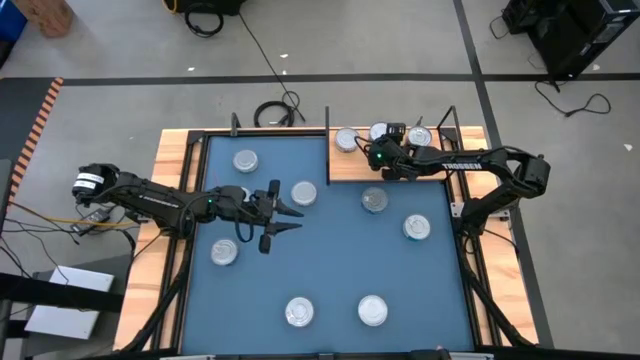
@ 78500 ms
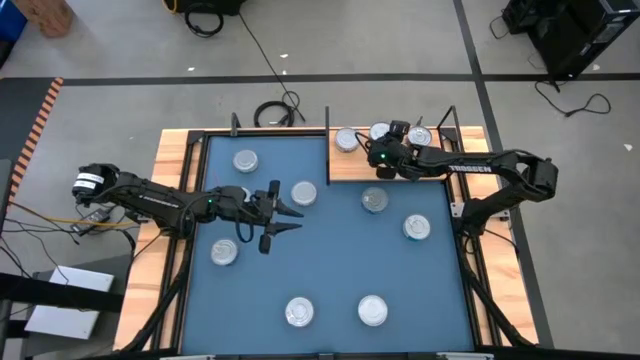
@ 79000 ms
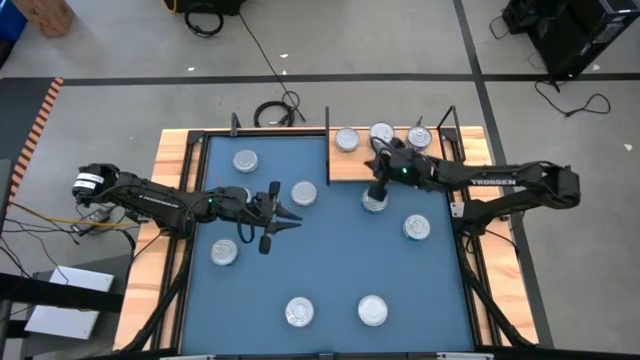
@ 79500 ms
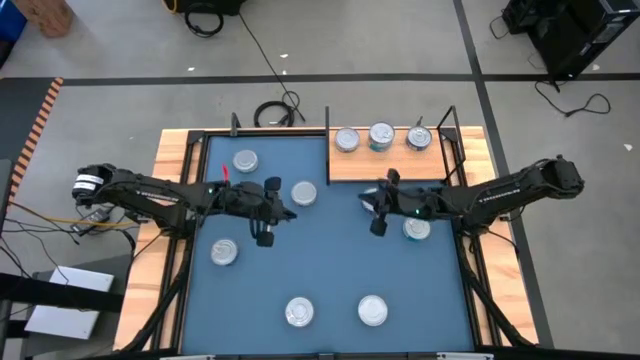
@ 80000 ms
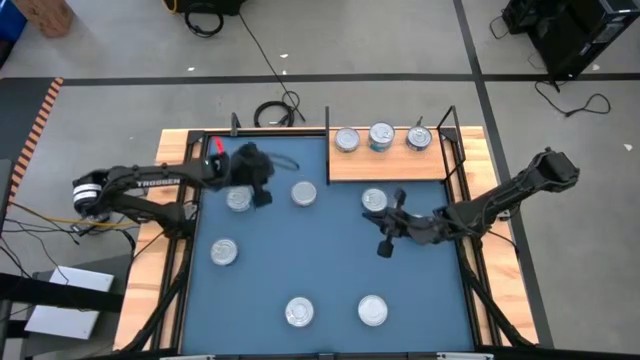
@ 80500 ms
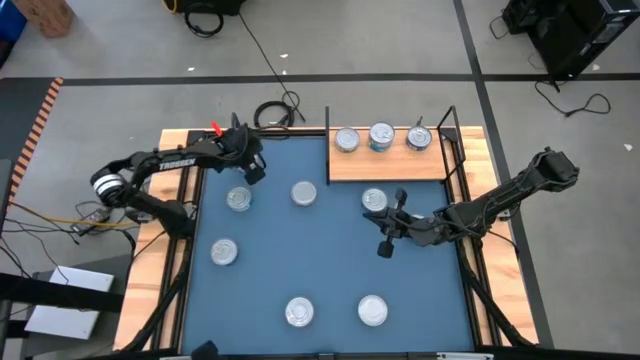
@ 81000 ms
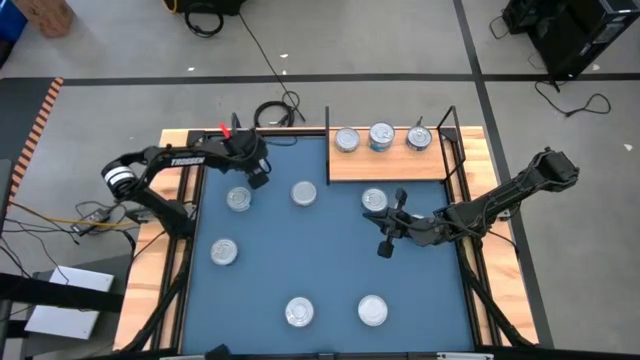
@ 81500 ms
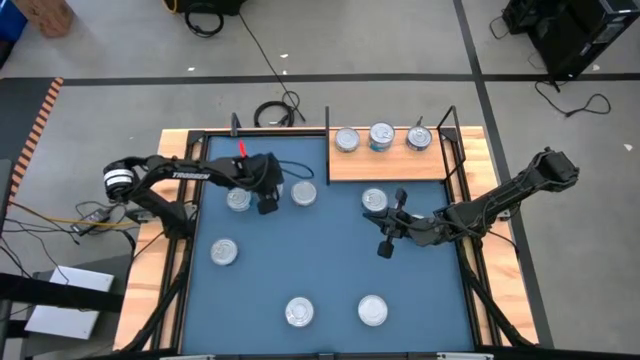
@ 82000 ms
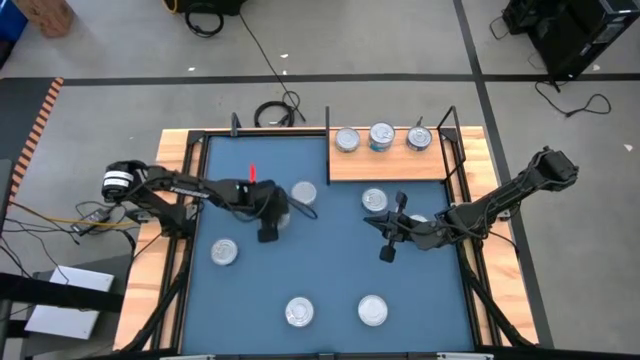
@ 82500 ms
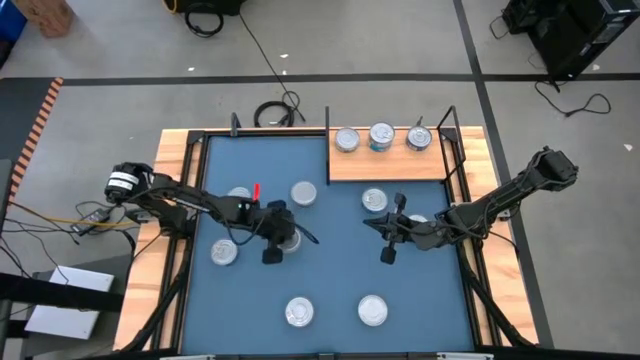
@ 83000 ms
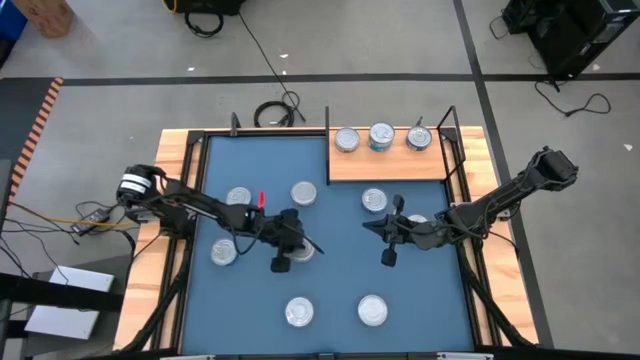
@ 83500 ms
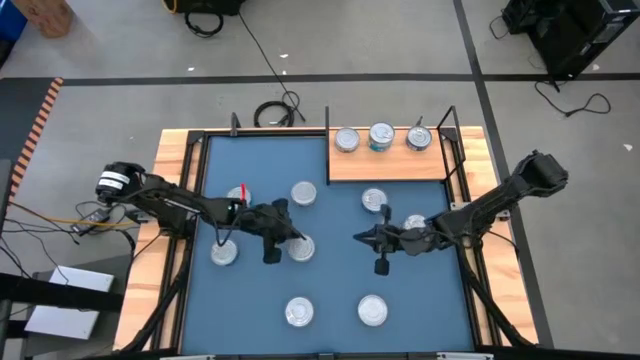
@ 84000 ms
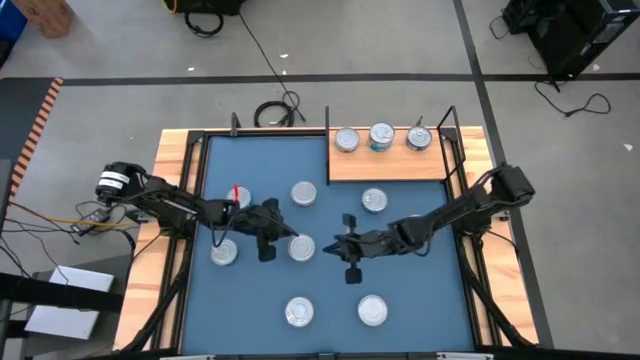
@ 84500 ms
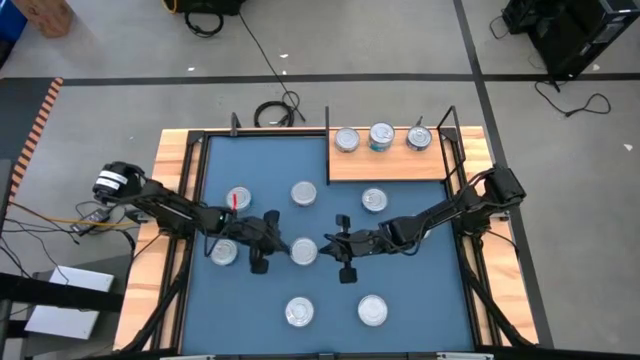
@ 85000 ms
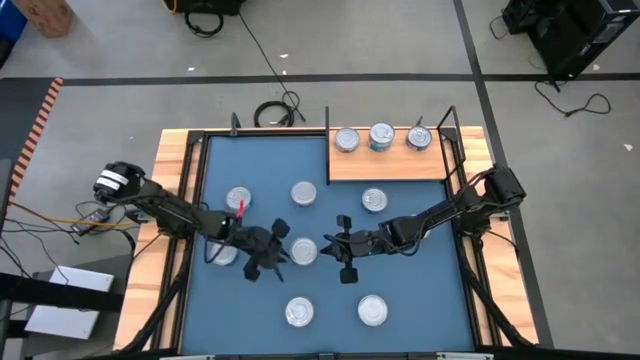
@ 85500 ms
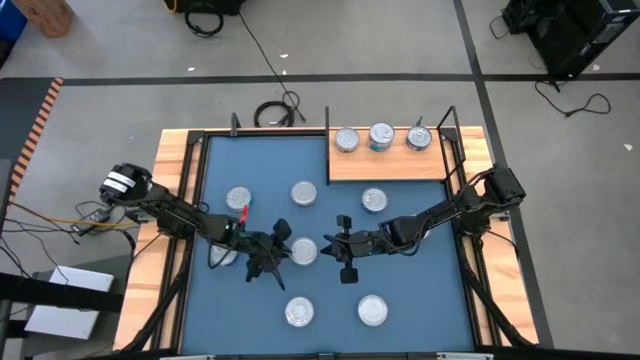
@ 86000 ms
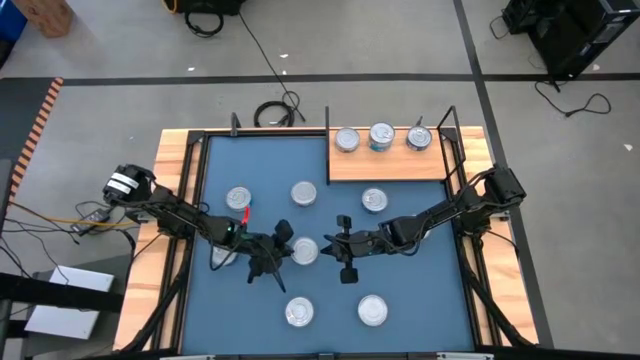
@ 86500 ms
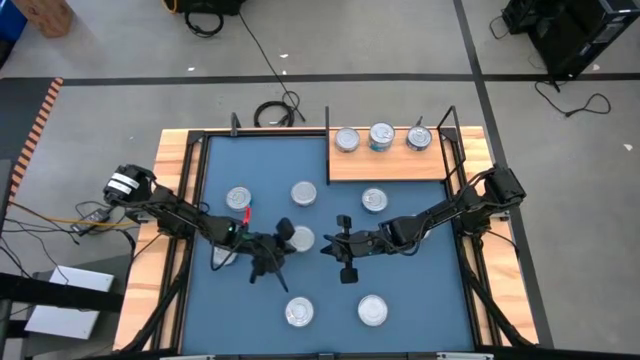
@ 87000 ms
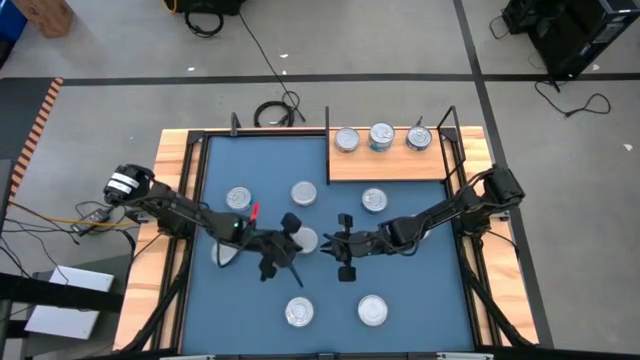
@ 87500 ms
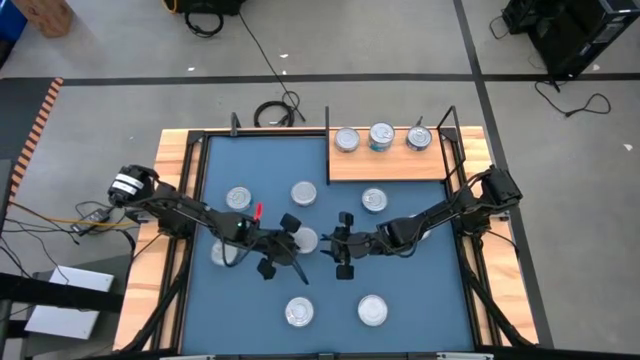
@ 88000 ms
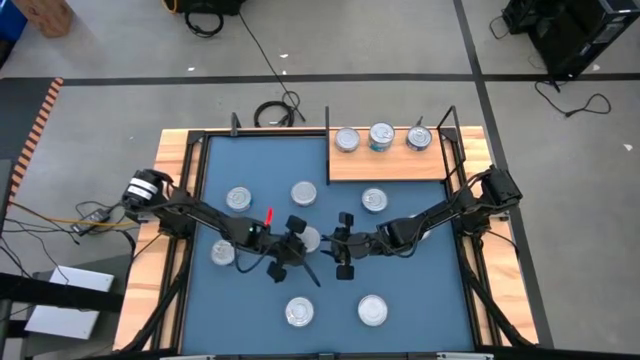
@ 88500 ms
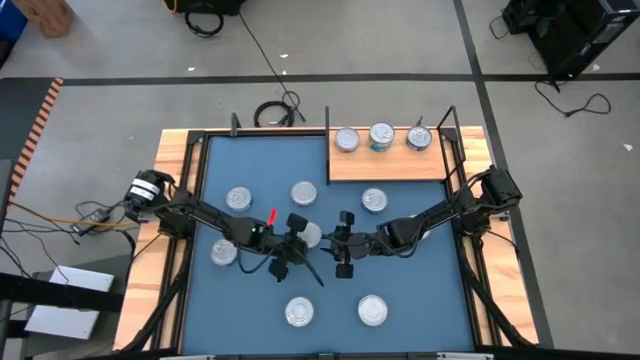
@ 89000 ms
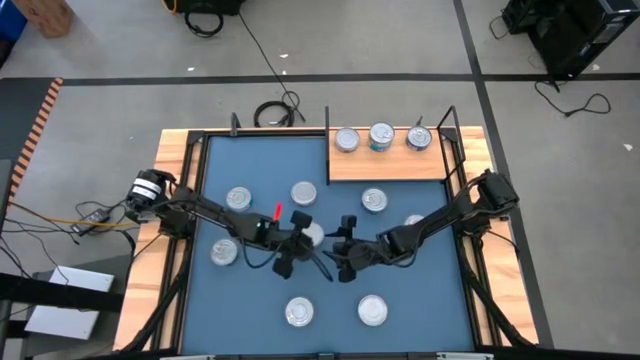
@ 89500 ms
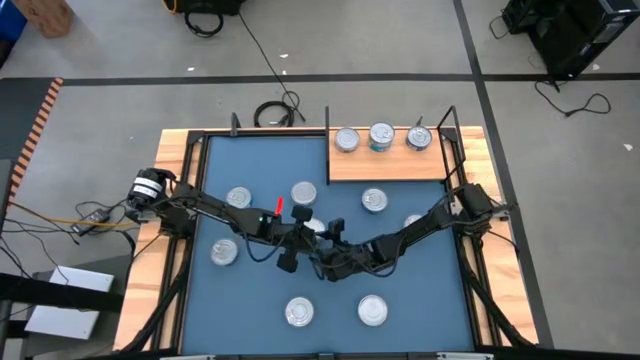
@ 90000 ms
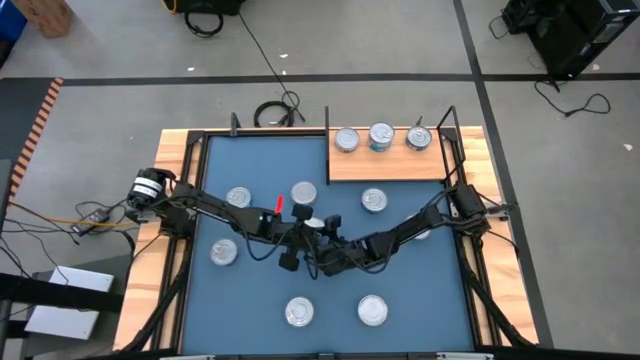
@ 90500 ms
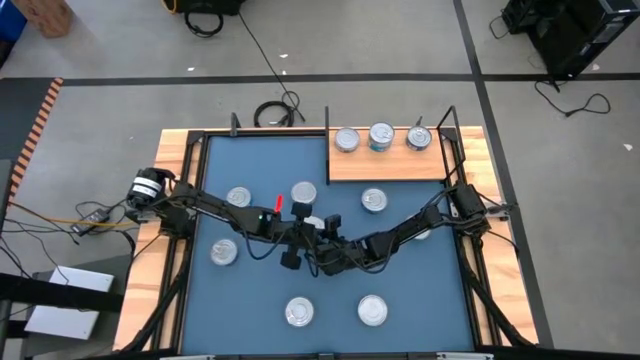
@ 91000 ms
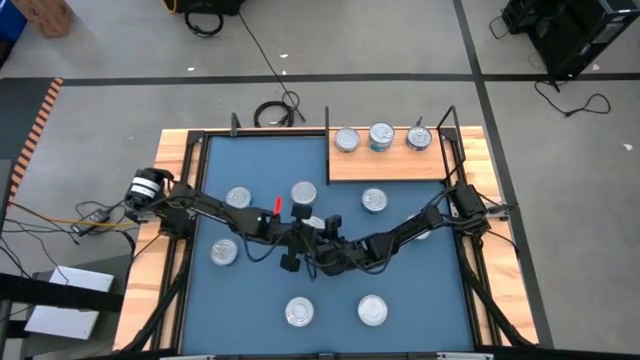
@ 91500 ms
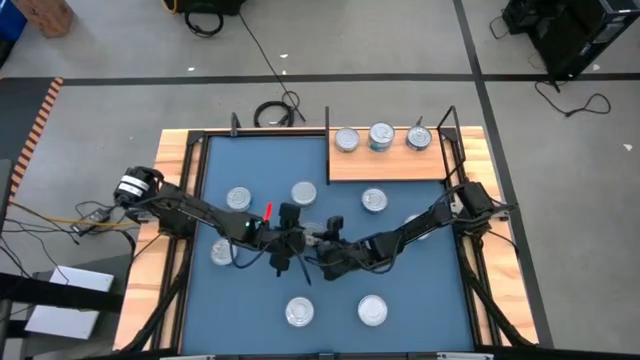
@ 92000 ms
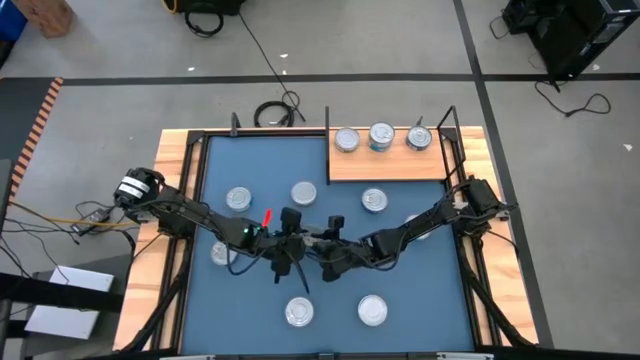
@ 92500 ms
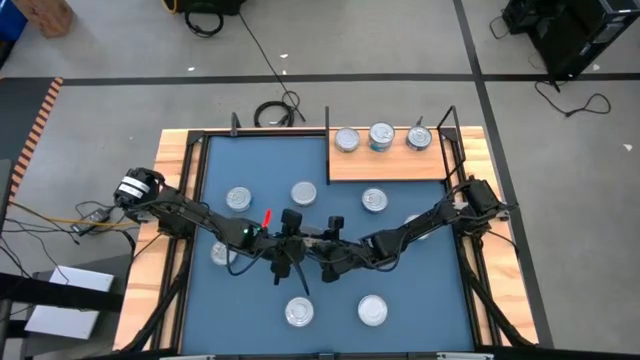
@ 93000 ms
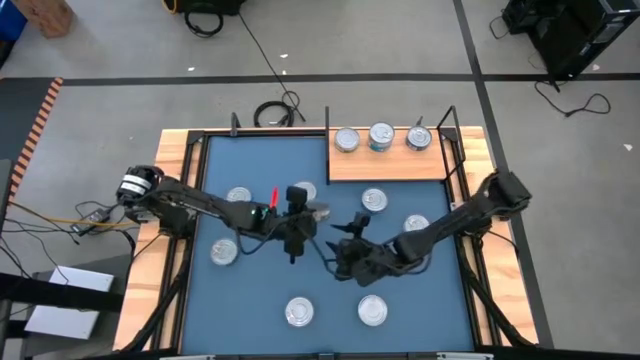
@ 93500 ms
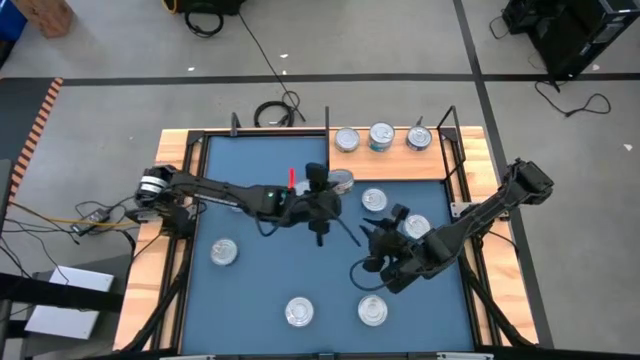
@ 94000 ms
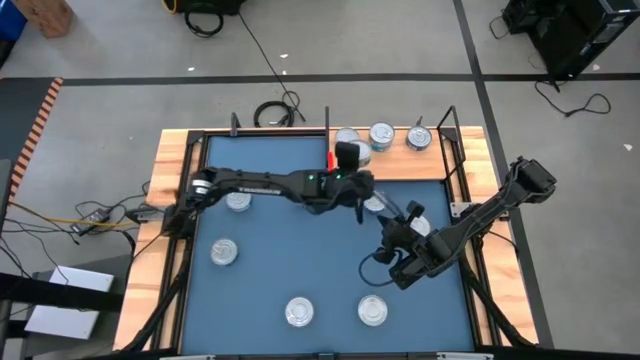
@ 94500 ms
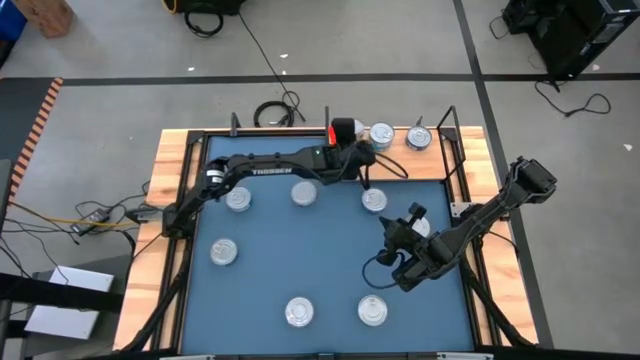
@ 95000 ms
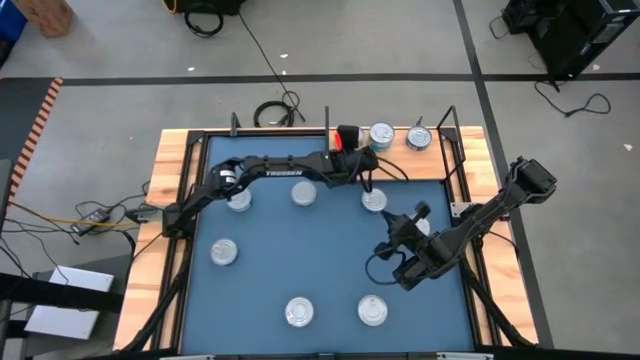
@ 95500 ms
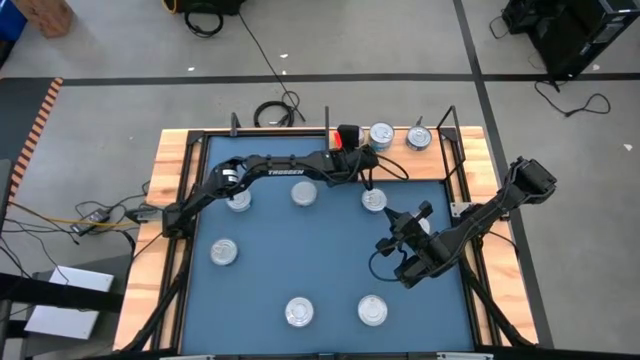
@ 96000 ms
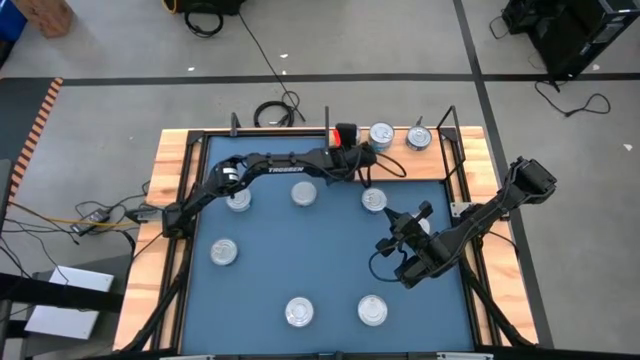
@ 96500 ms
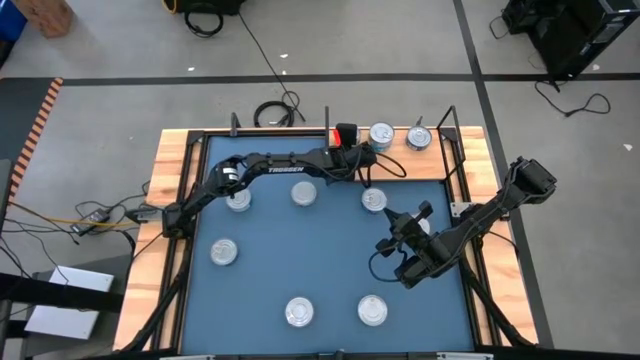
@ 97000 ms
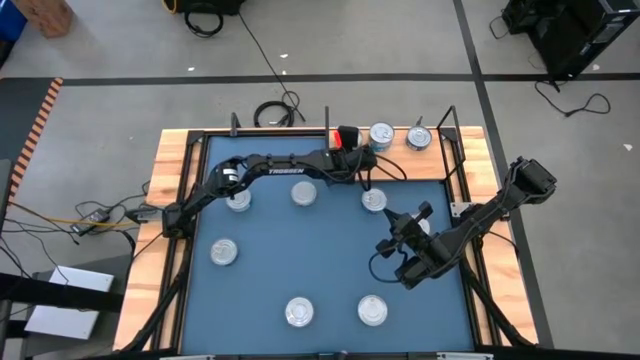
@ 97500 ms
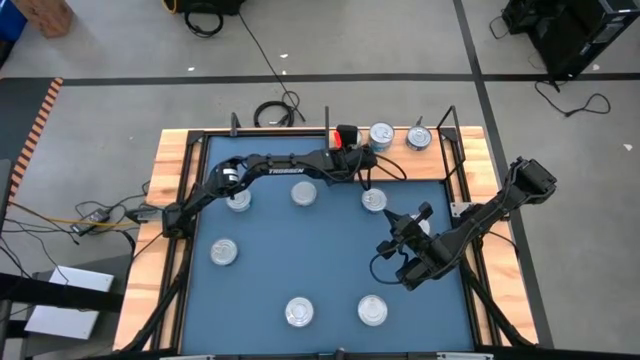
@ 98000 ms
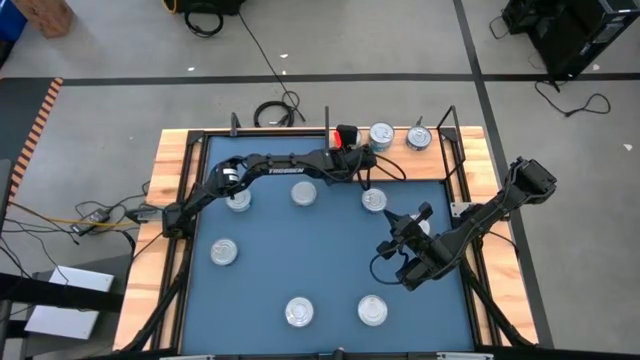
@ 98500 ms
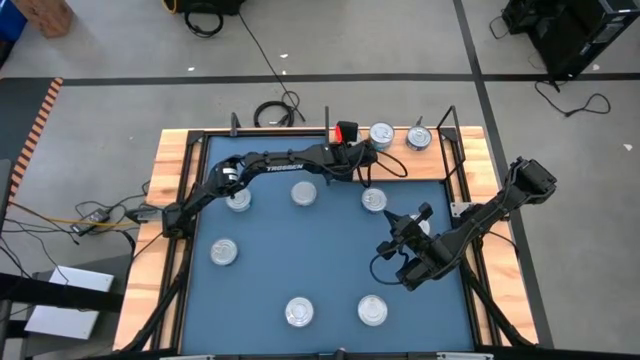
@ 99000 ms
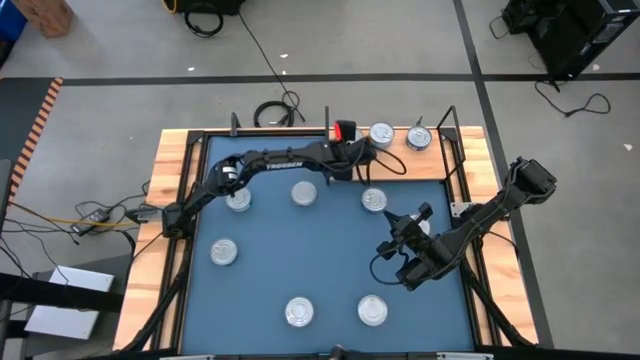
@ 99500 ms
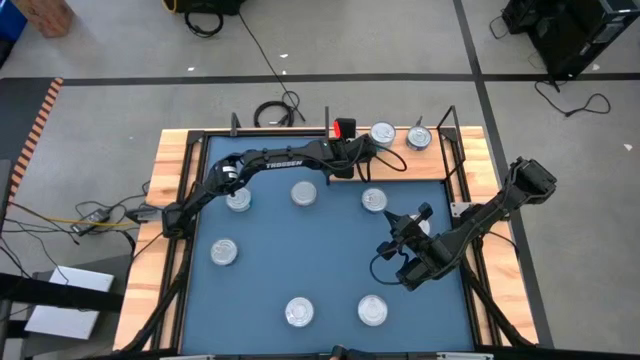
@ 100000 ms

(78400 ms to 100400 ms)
Task: Stack canned seafood by type on shelf
Stack the top left green tuna can onto the green tuna can on the shelf

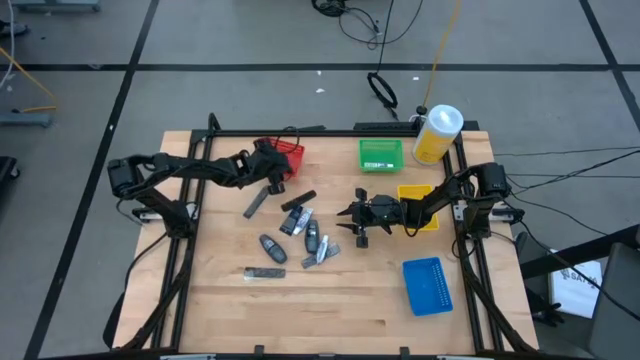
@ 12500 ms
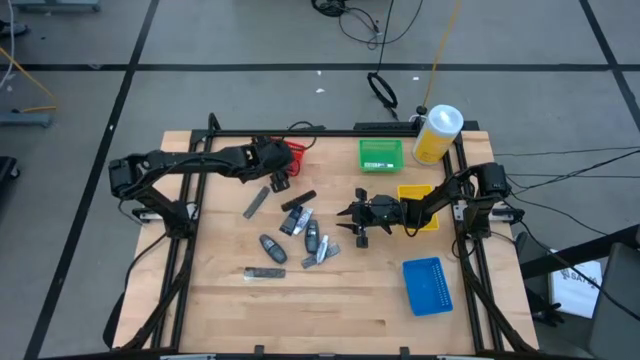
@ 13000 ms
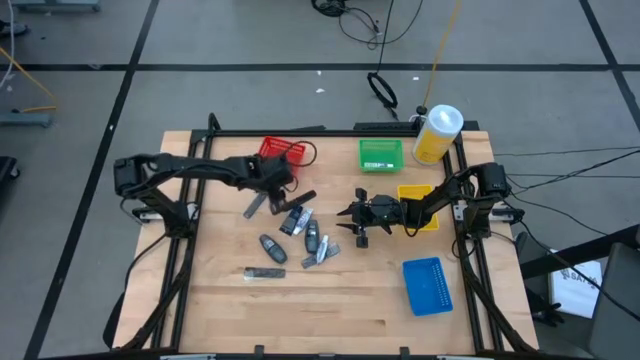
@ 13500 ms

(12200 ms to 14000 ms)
Task: Pick & Place Travel size toiletries
Adjust the red bin
